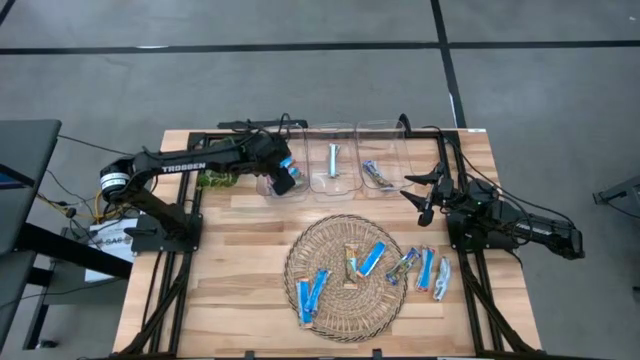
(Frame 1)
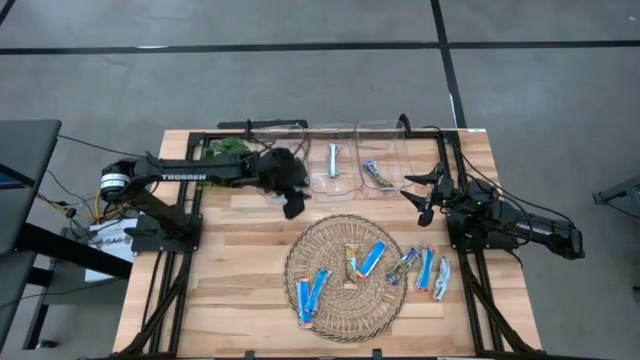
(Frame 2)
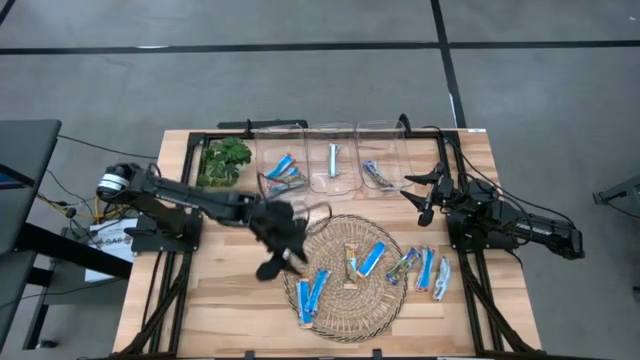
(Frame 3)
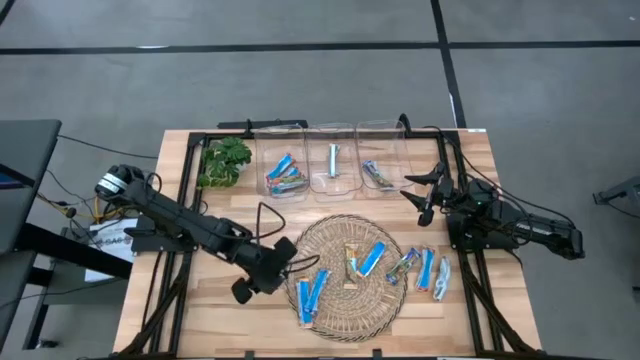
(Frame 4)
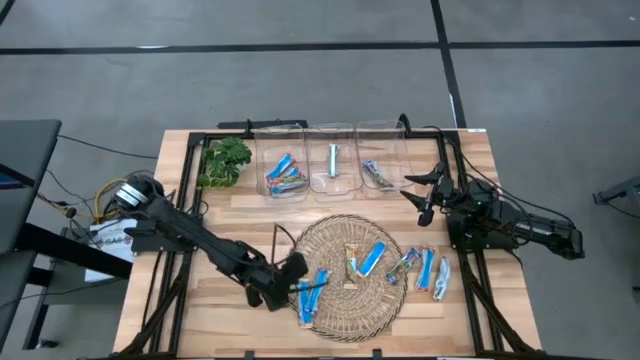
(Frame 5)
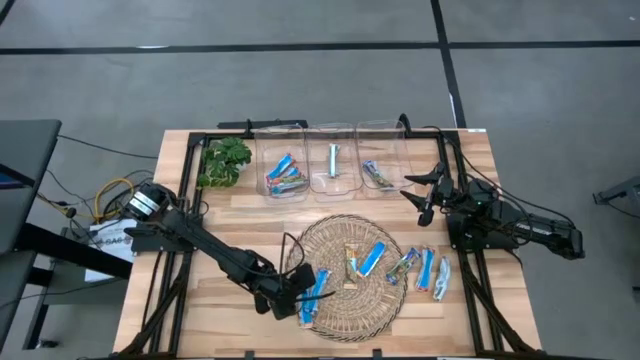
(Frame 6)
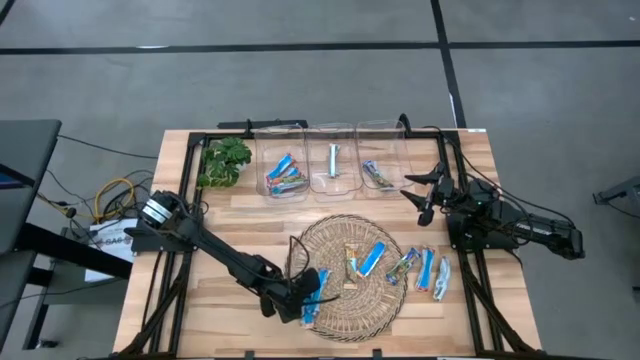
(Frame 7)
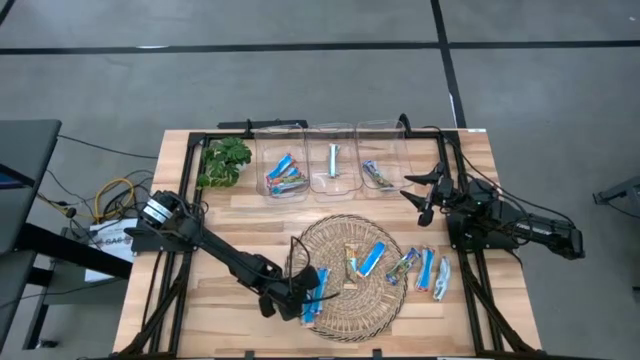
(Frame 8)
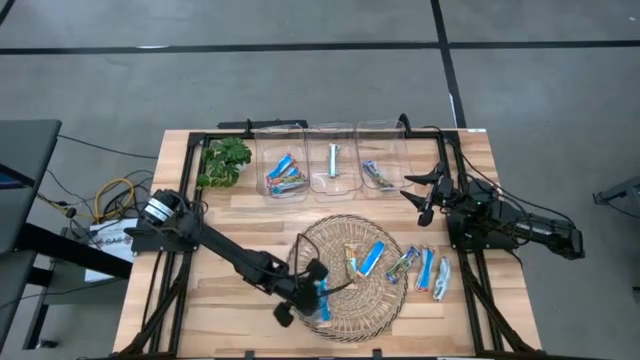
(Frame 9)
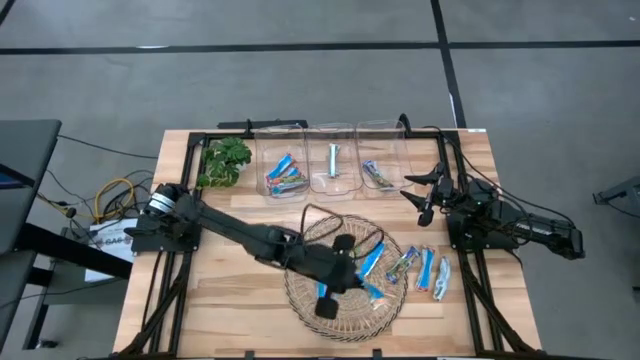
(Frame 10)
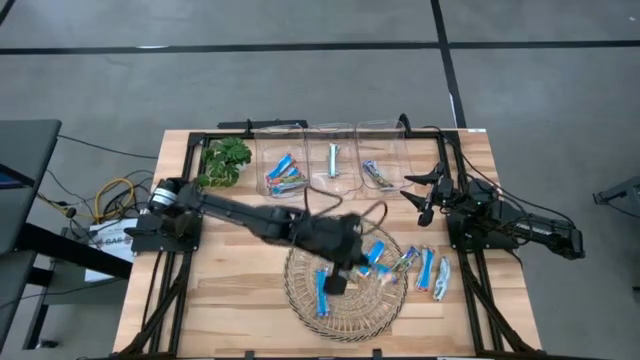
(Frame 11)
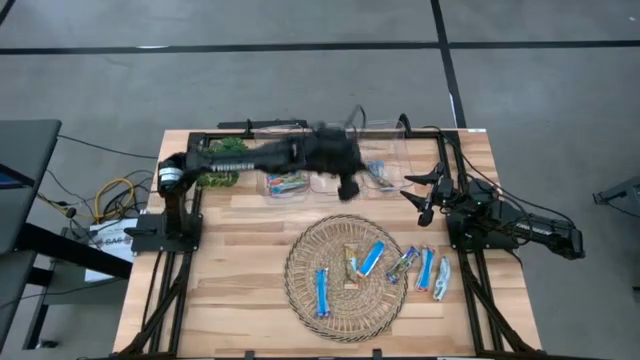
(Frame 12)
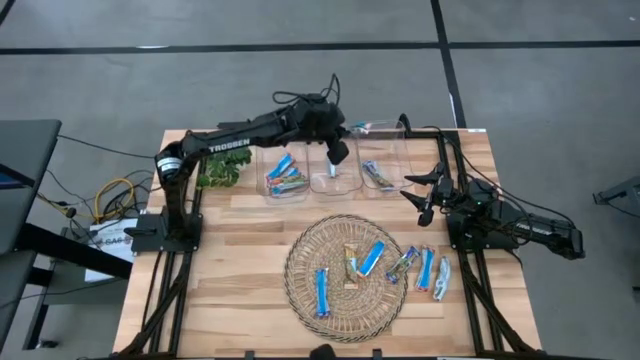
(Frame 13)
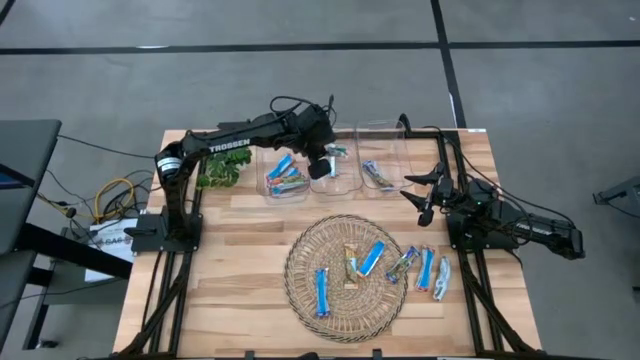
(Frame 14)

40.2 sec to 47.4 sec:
Task: Pick and place Granola Bars by type
Put the yellow granola bar into the middle transparent bin

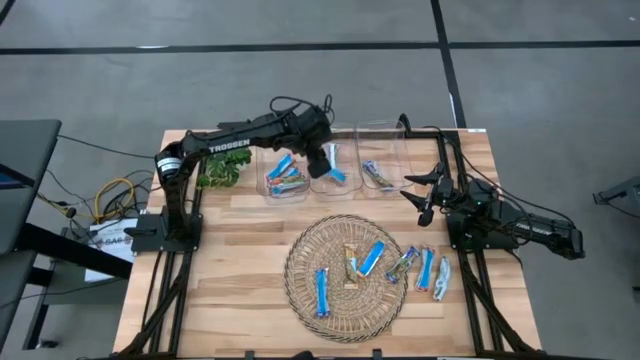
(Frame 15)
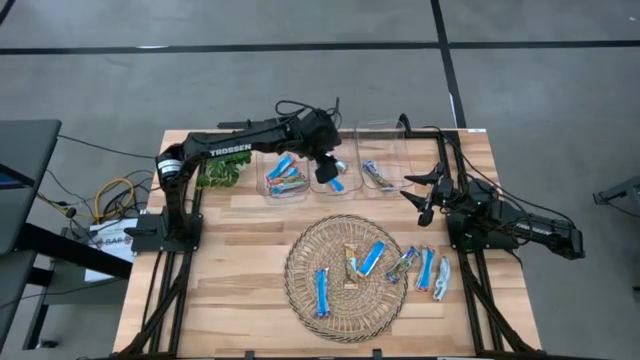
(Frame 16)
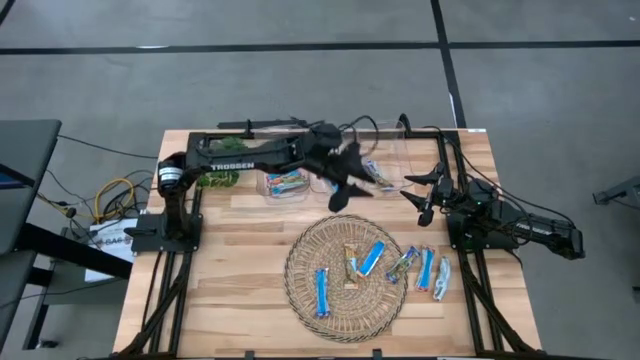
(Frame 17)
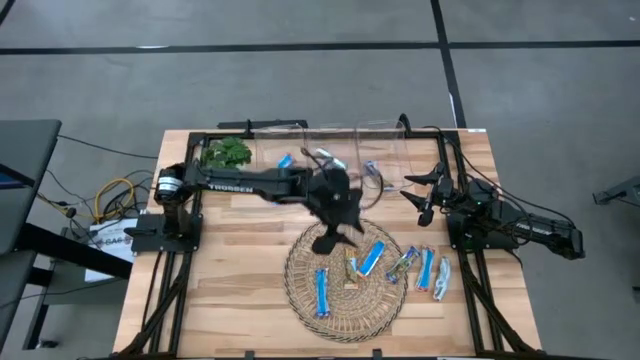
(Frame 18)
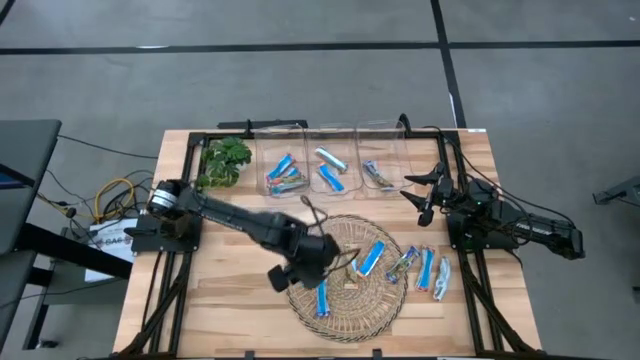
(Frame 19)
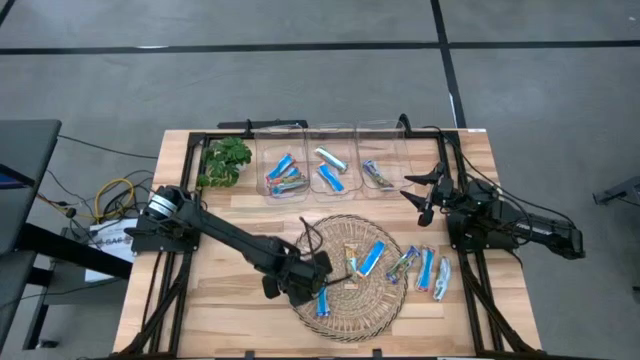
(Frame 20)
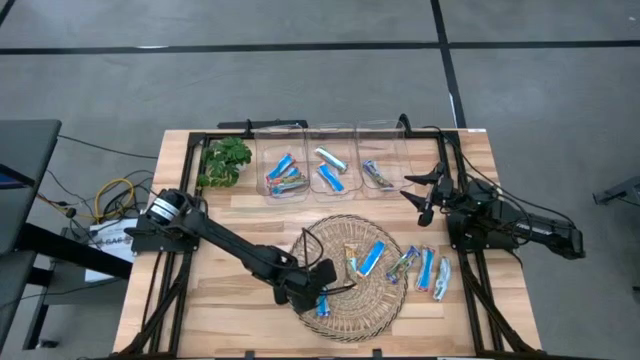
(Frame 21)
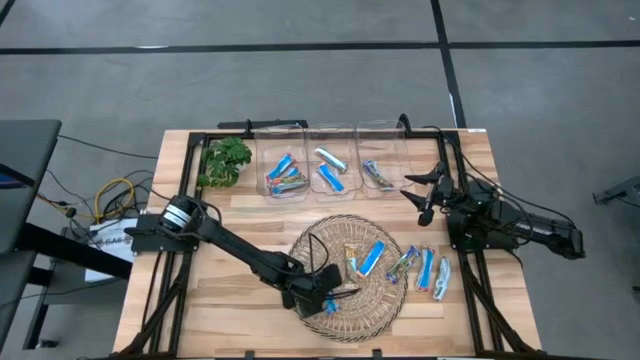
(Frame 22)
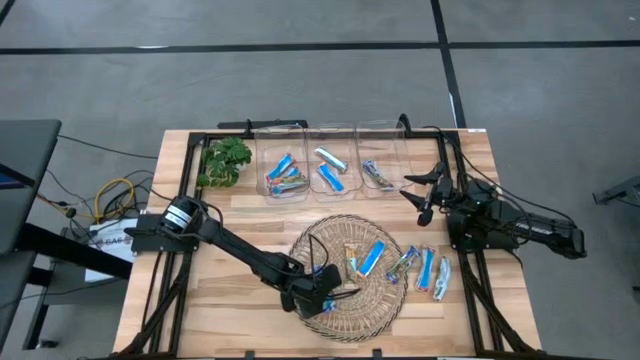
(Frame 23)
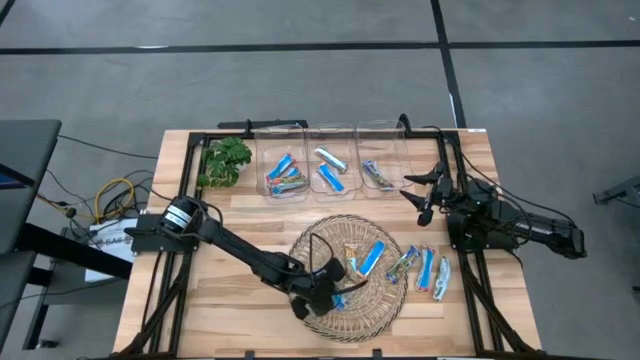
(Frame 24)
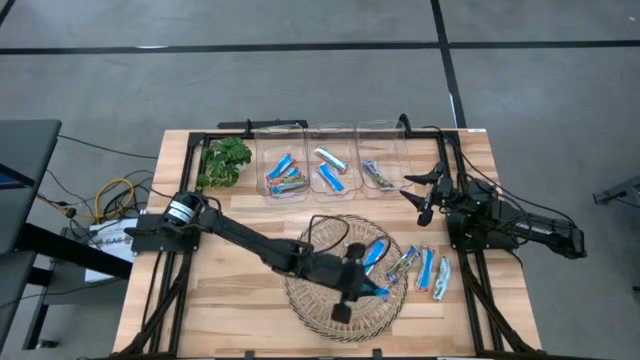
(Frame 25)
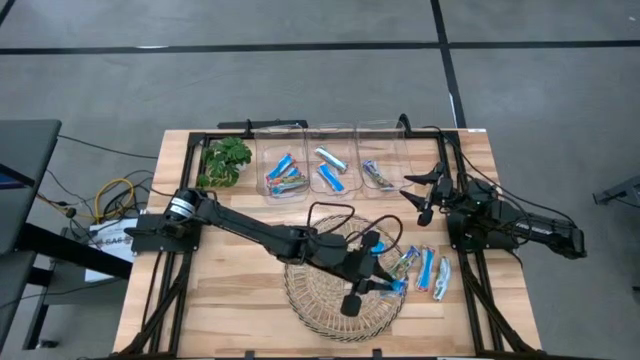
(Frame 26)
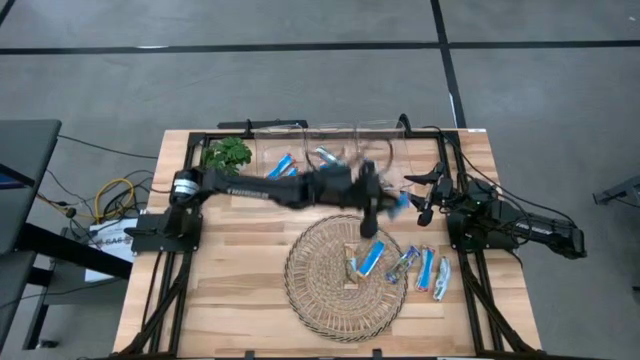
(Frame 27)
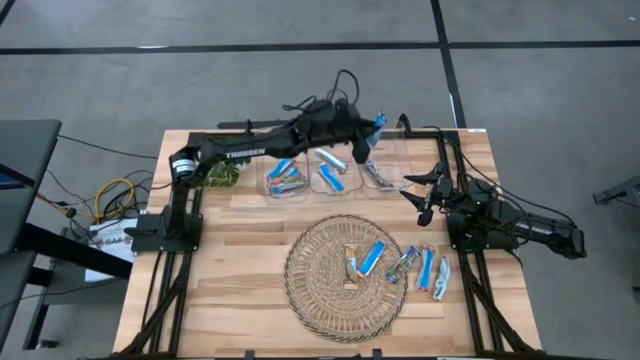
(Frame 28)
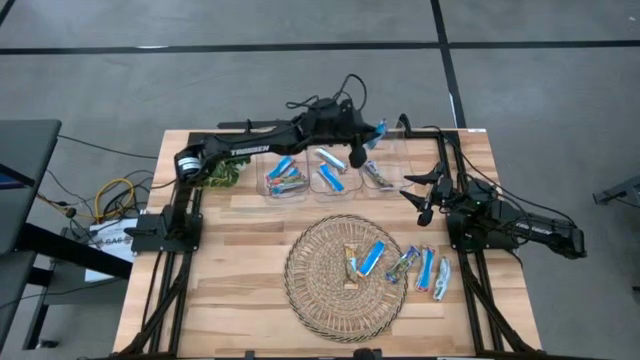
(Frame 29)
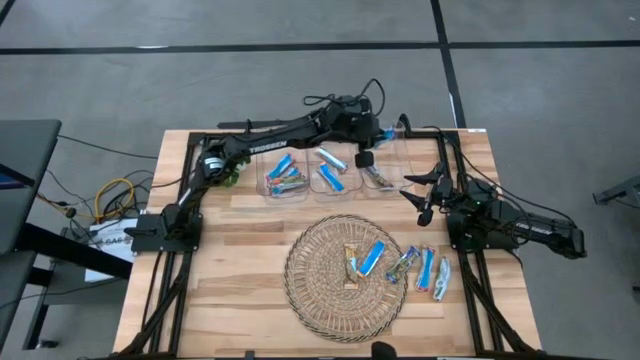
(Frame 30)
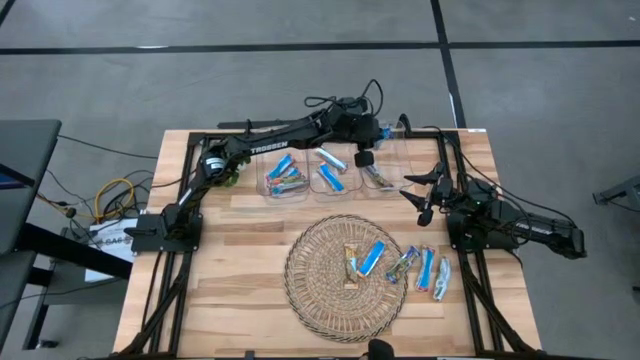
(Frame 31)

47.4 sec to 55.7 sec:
Put the blue granola bar into the right transparent bin

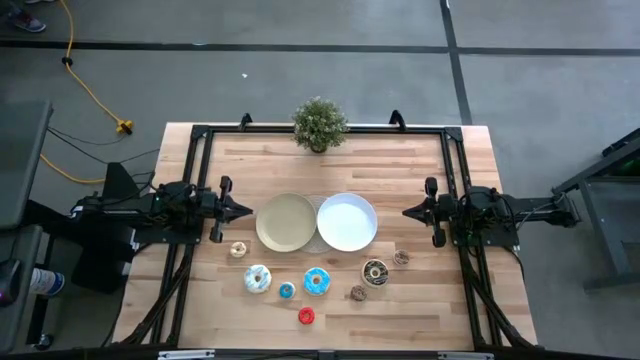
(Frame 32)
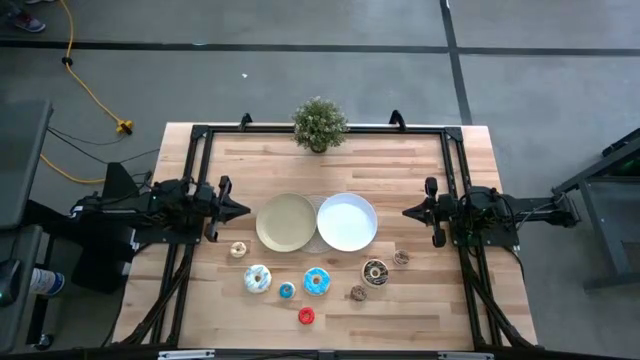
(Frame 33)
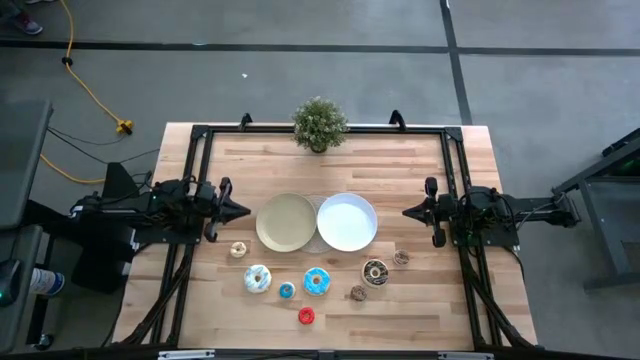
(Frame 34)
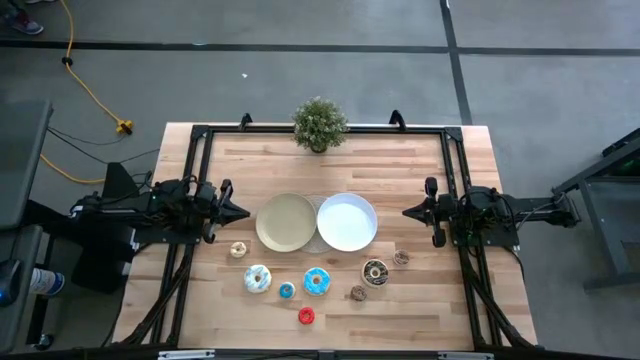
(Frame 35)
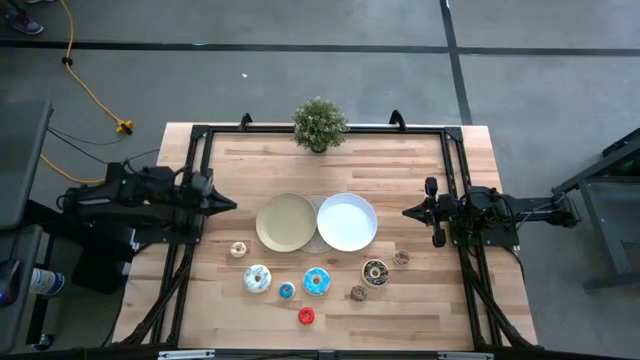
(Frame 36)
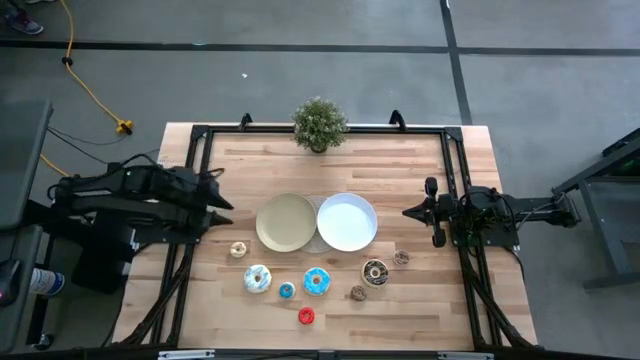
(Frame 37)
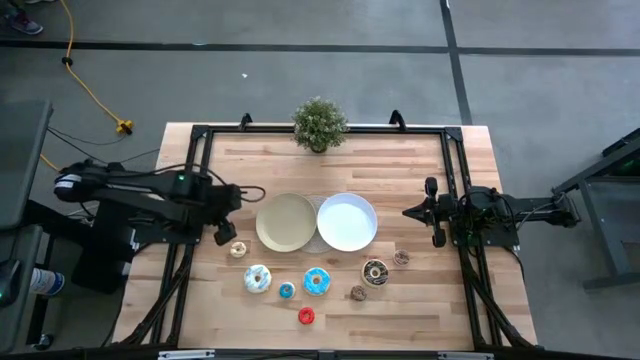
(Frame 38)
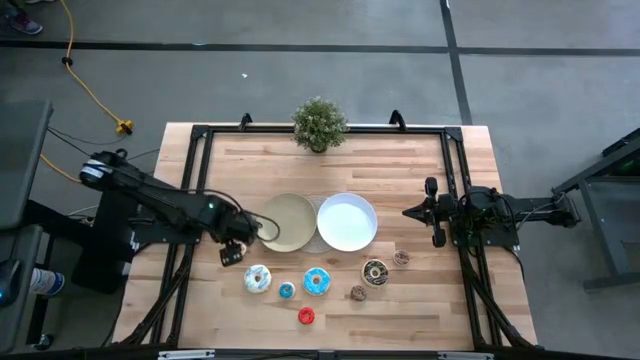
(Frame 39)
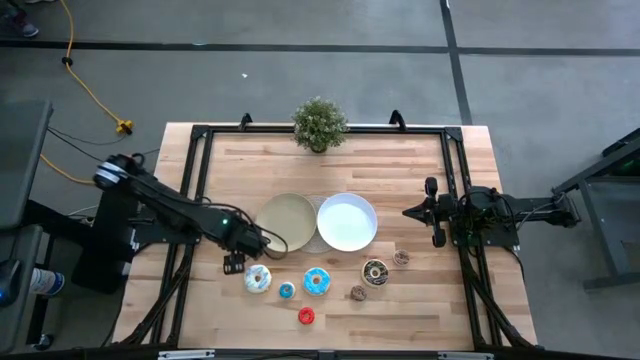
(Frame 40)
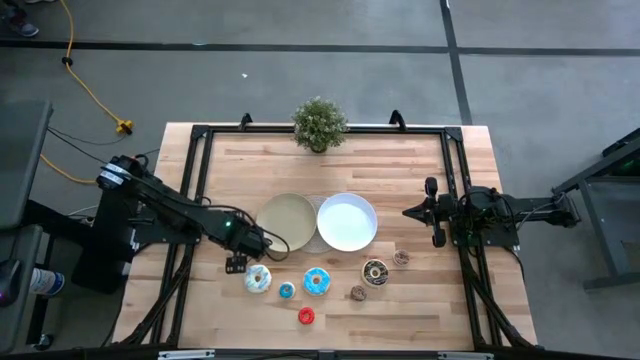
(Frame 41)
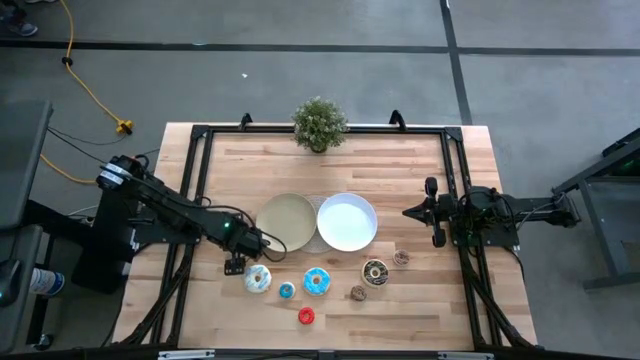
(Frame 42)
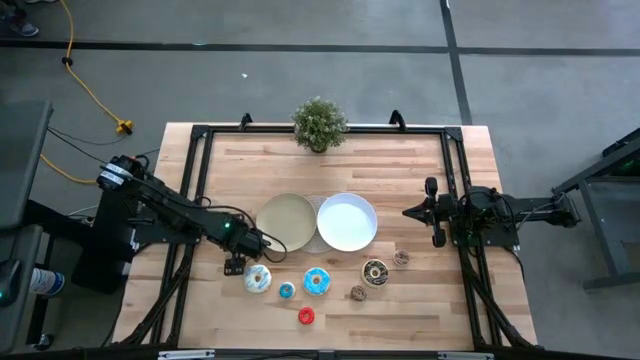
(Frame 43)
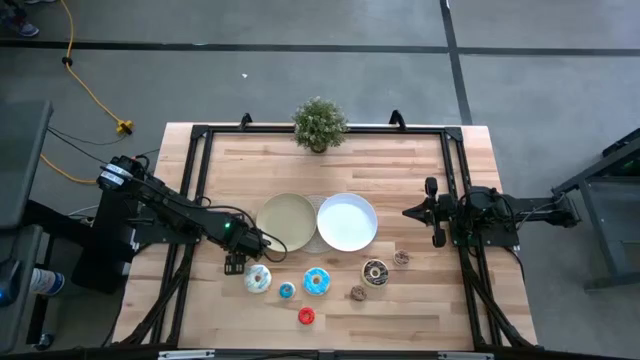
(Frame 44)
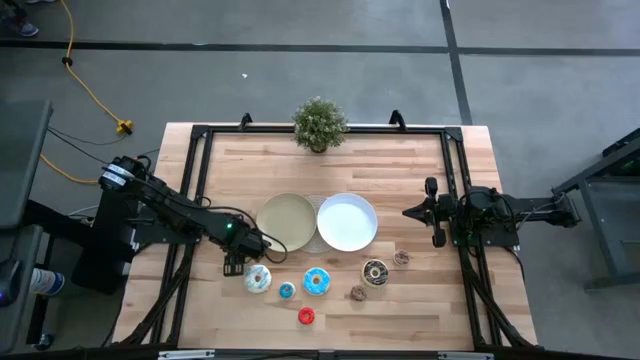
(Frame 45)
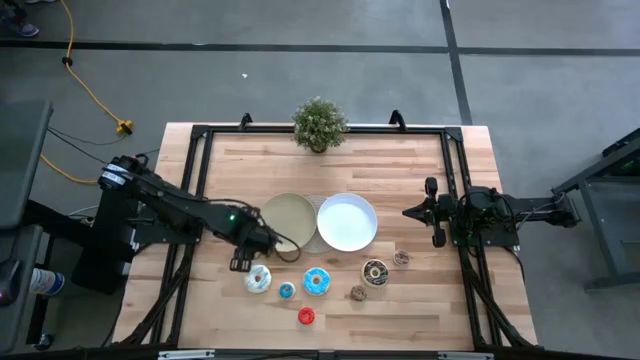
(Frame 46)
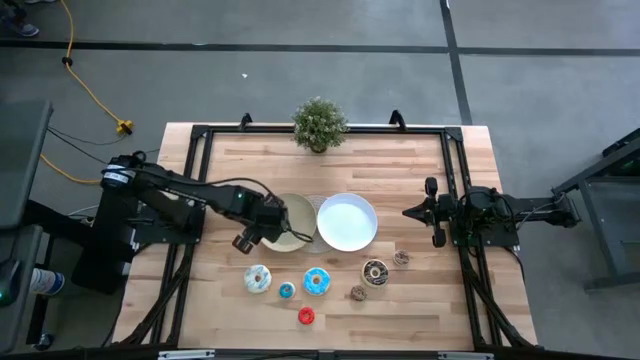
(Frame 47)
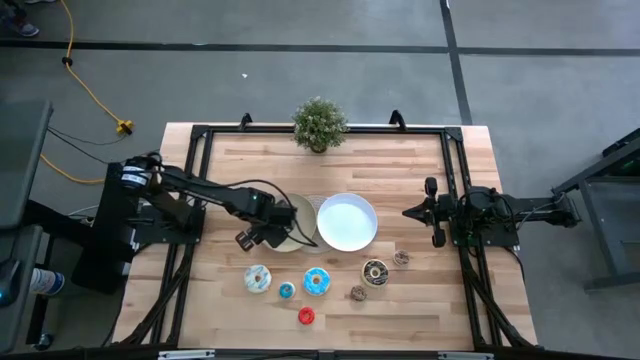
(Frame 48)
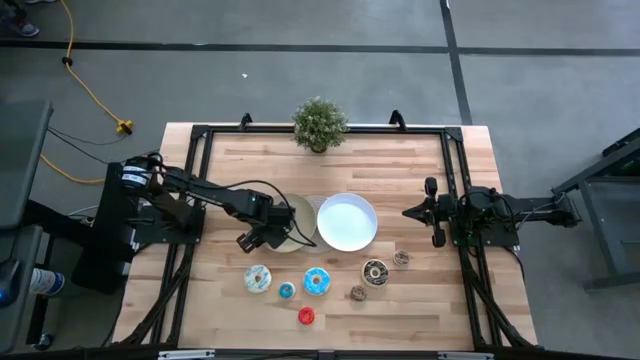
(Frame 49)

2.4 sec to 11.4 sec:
Task: Pick & Place donuts
Put the small white donut on the brown plate
